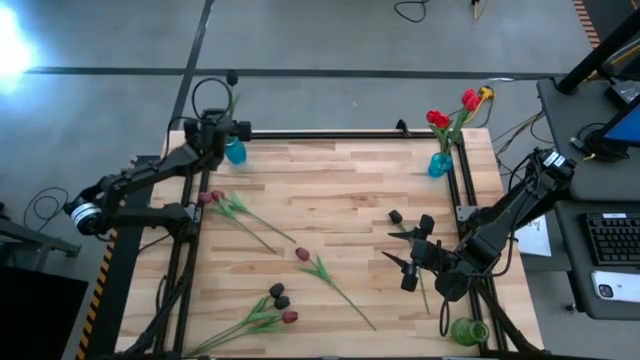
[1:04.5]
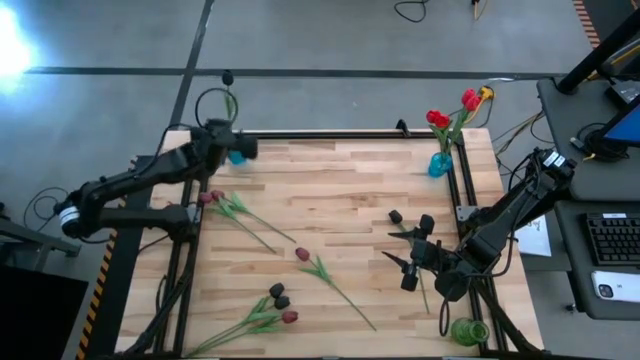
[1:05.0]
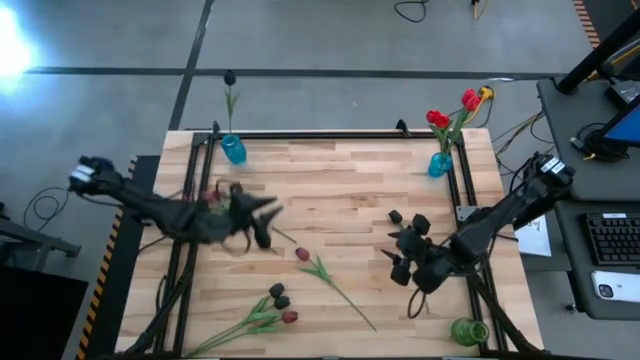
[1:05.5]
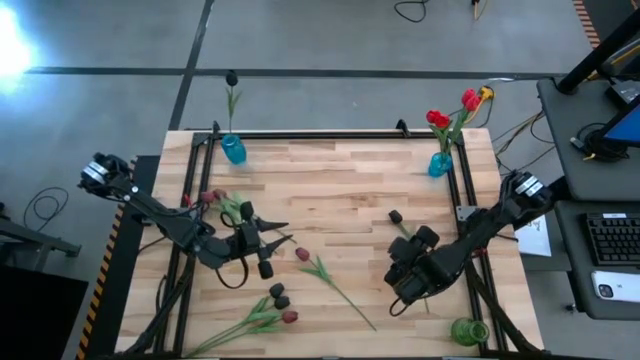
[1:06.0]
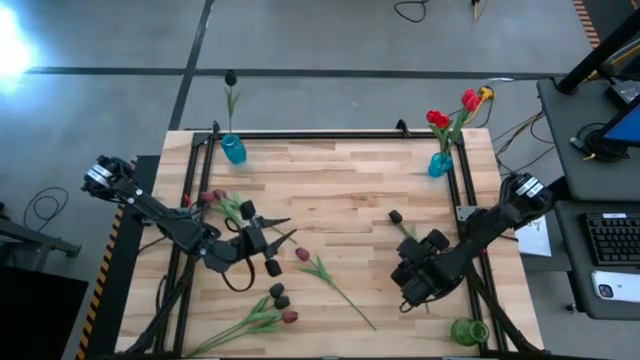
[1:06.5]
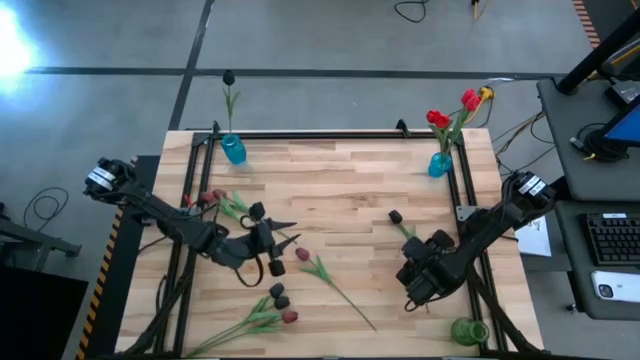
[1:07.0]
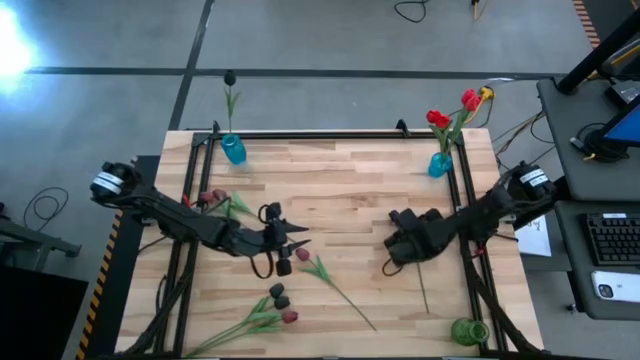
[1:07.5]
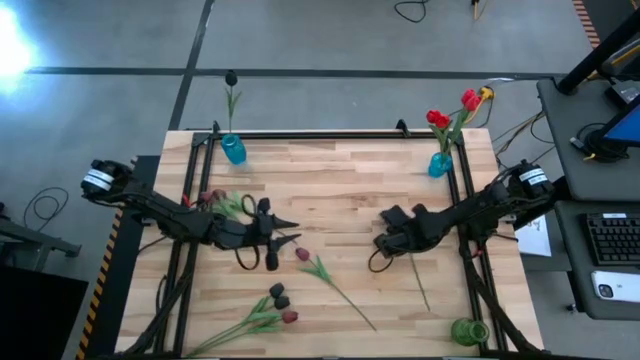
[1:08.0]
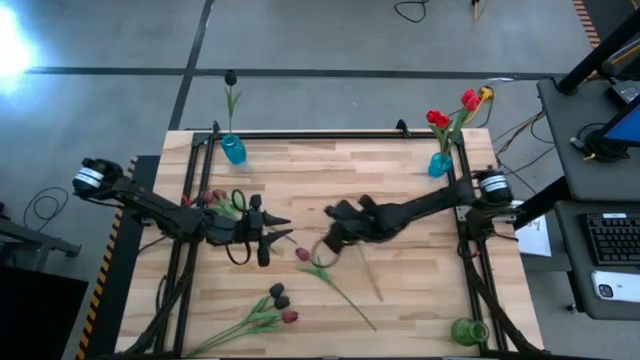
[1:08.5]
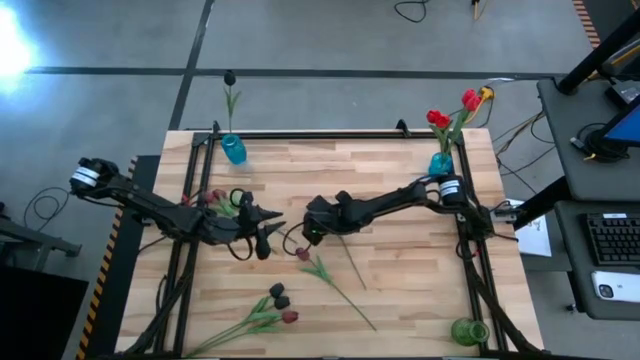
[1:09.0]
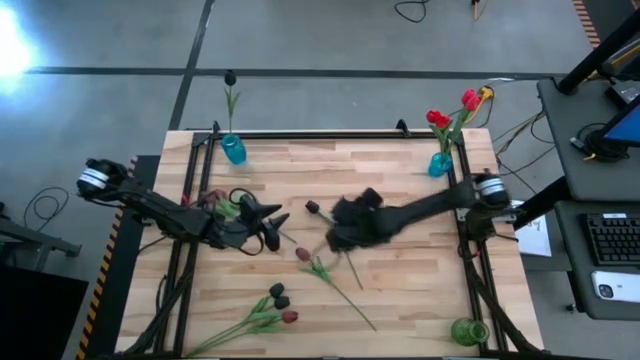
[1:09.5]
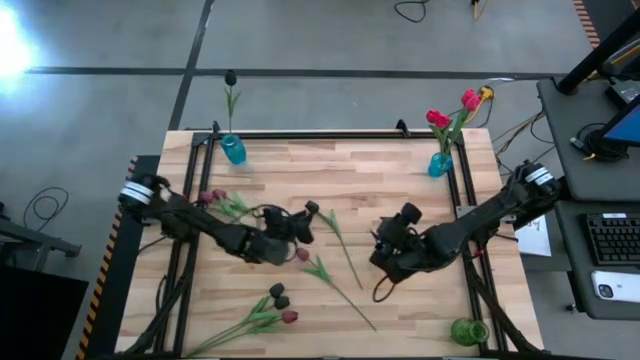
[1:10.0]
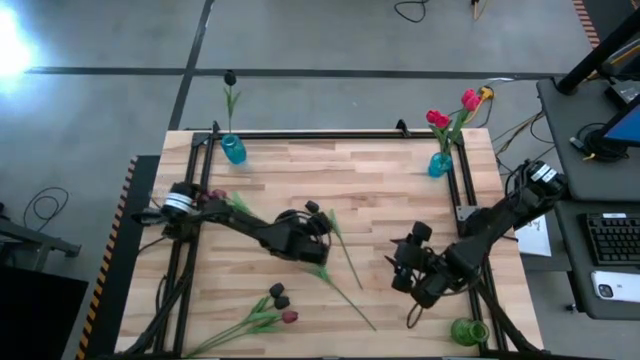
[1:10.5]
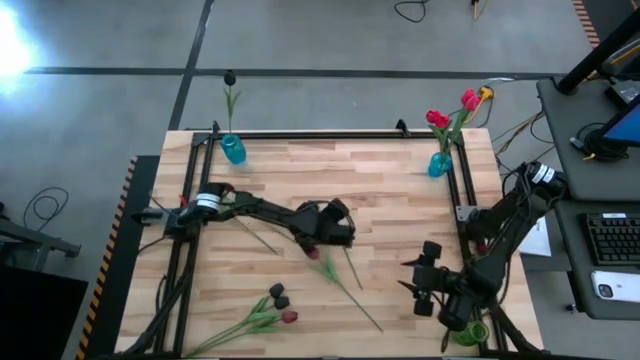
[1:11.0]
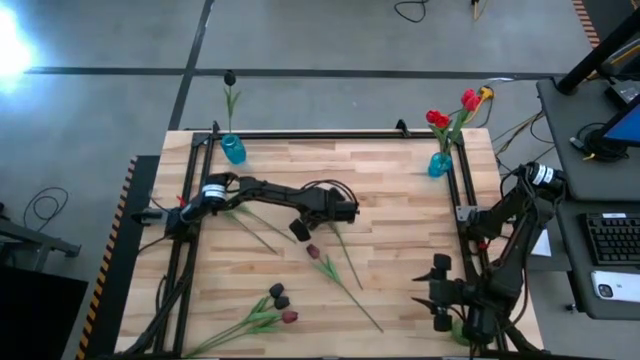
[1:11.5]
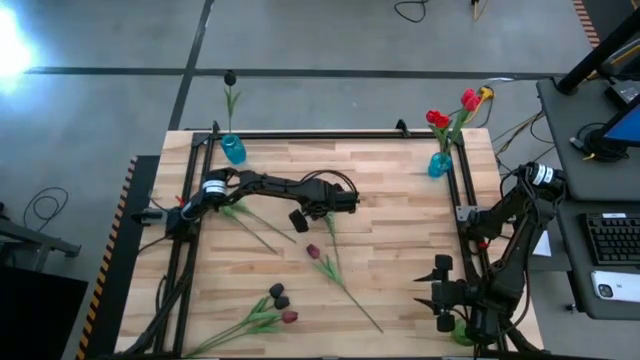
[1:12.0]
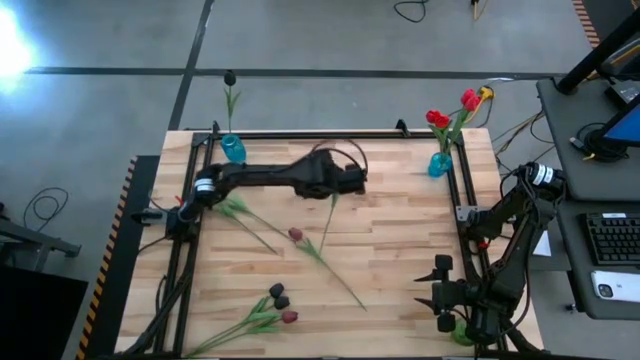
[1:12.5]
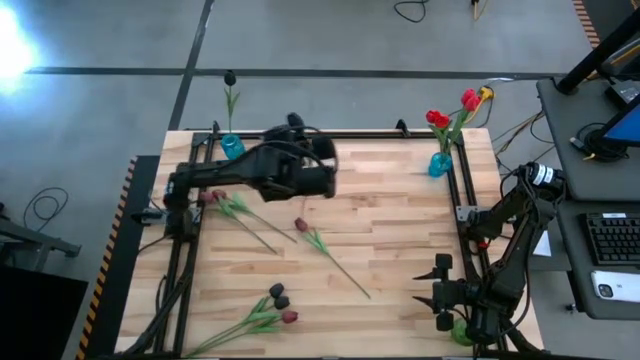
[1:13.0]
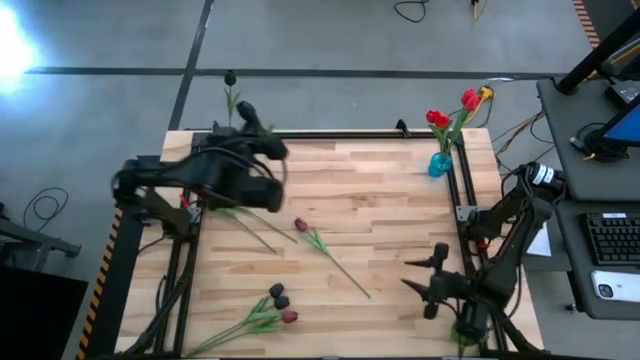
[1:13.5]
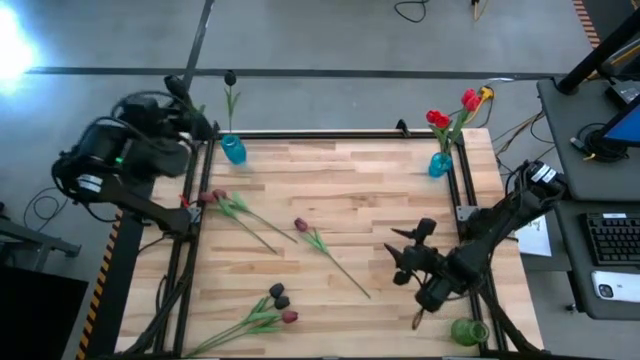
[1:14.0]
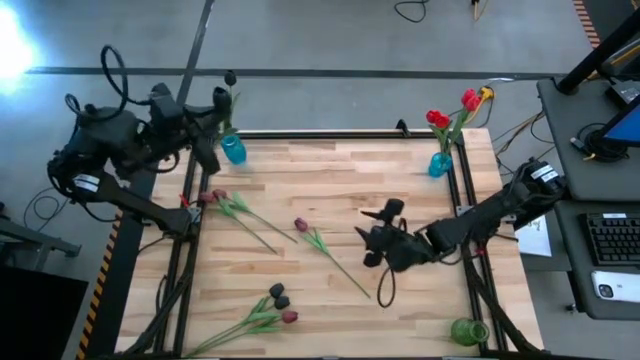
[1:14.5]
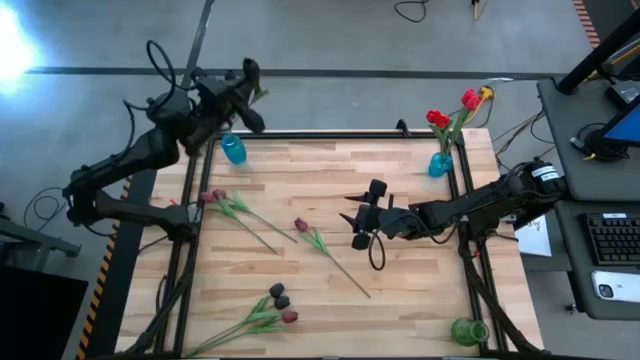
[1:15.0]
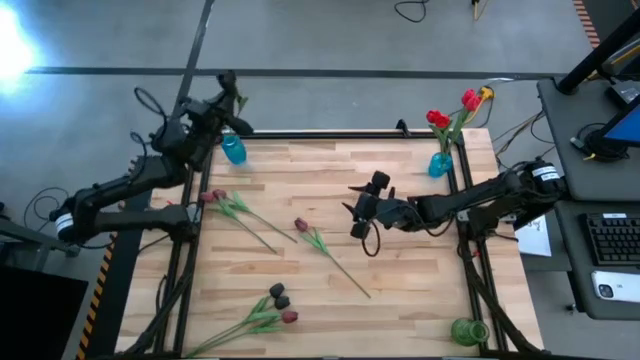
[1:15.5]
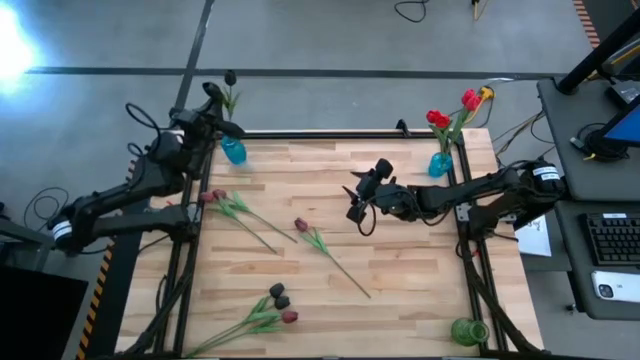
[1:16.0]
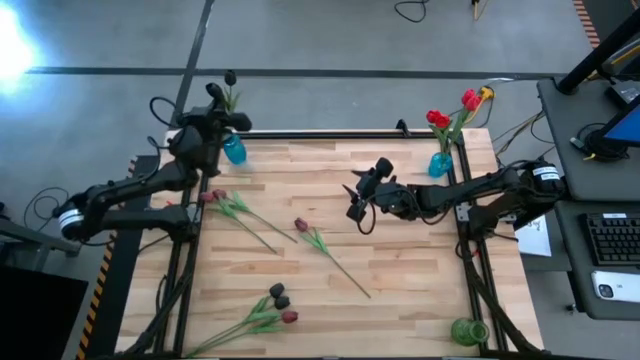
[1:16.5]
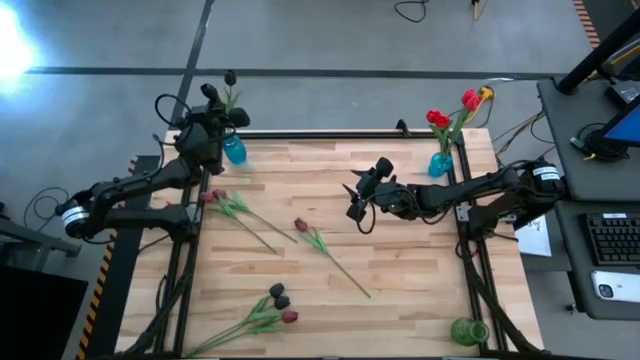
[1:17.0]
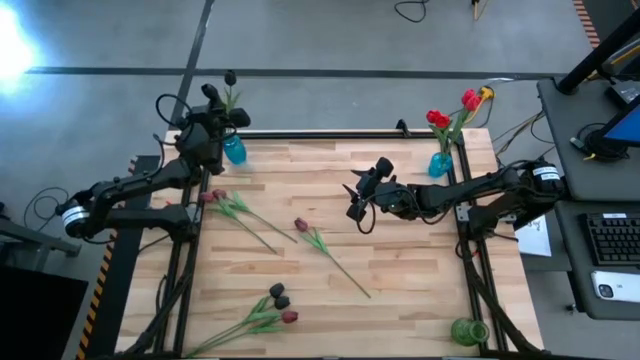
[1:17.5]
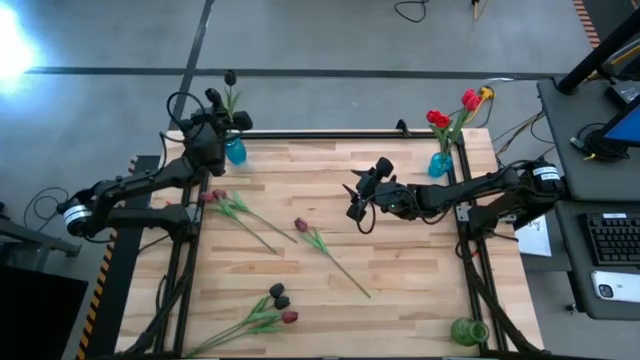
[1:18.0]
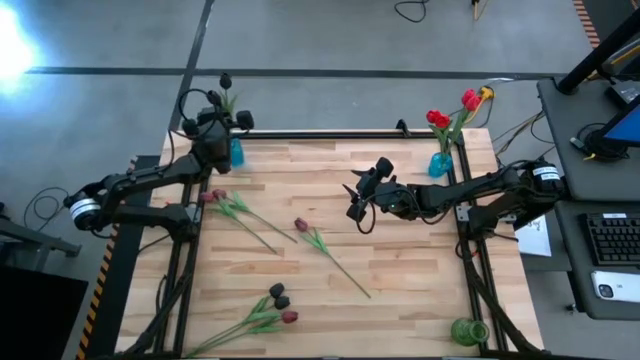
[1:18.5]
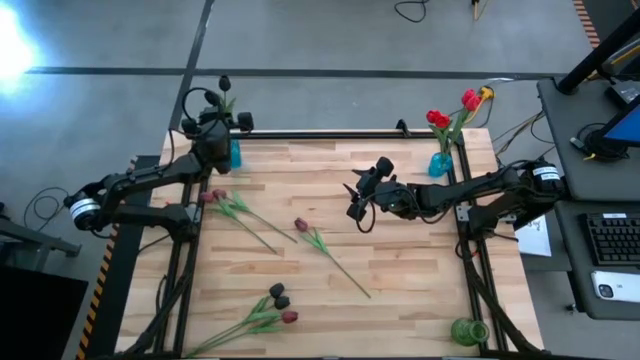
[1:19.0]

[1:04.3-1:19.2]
Task: Sort flowers into vase by color
Put the black tulip into the left blue vase

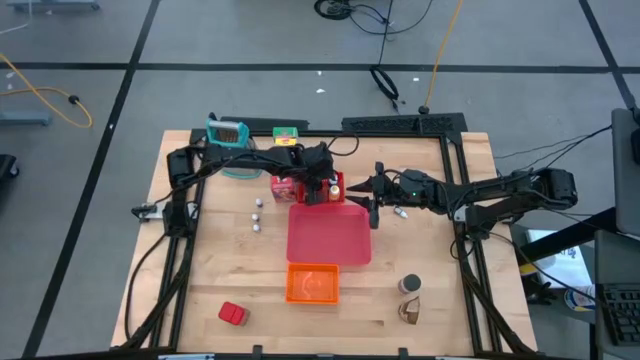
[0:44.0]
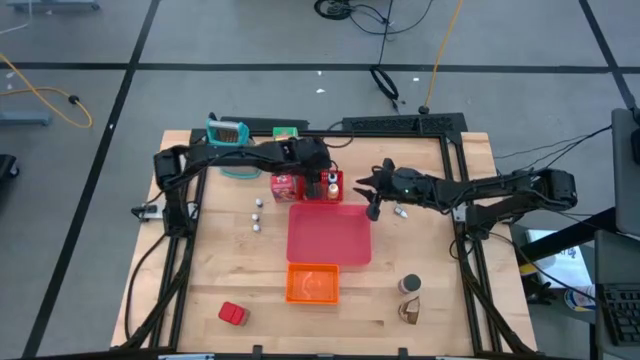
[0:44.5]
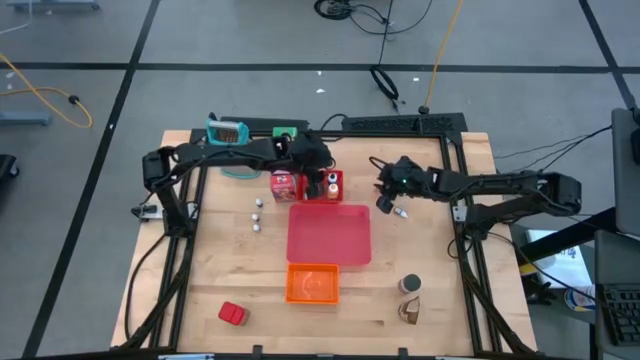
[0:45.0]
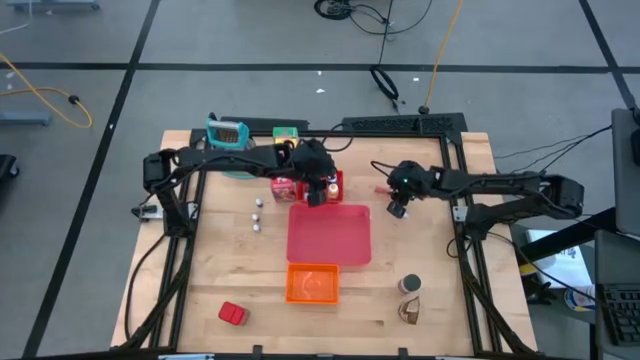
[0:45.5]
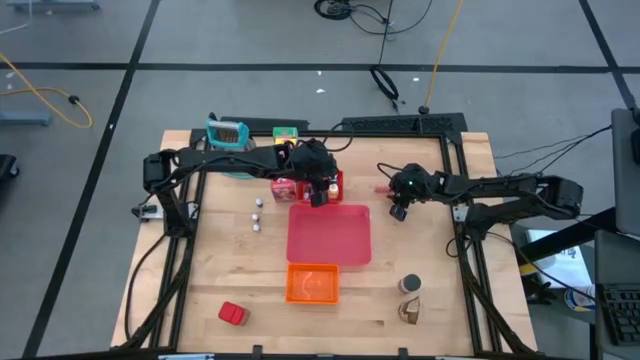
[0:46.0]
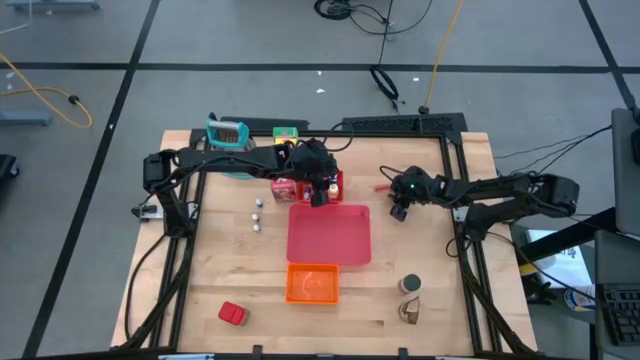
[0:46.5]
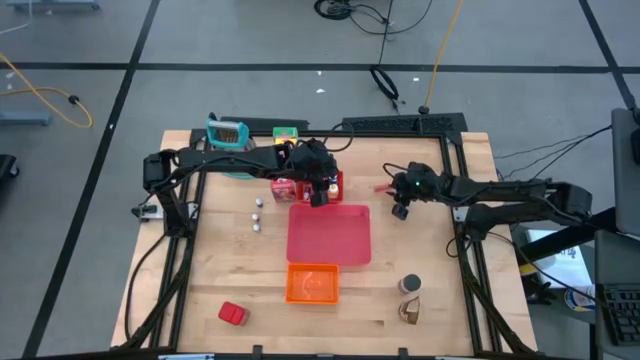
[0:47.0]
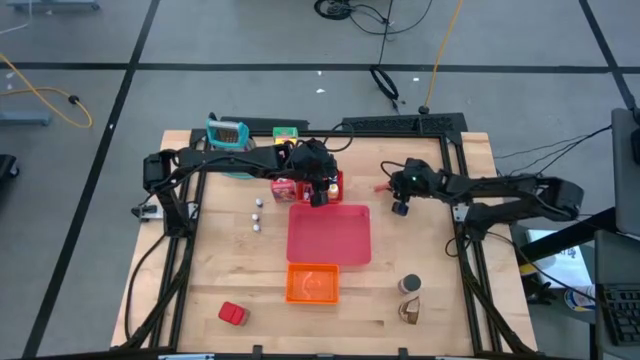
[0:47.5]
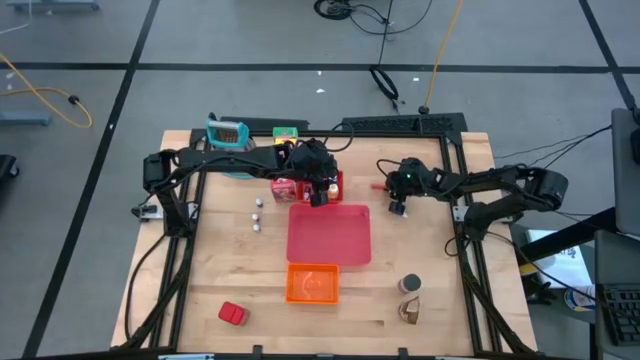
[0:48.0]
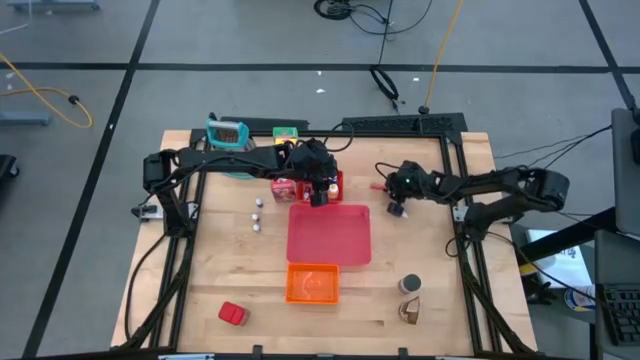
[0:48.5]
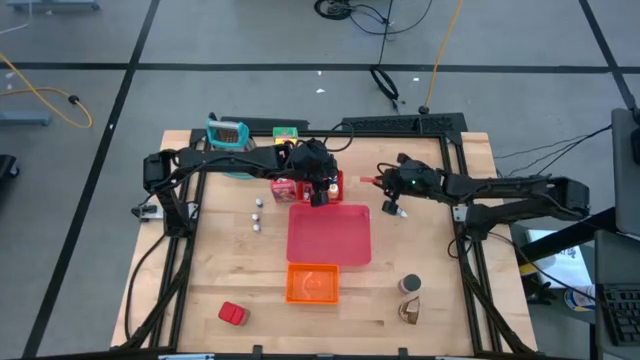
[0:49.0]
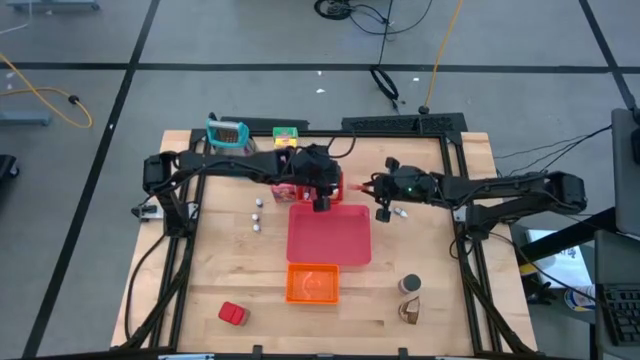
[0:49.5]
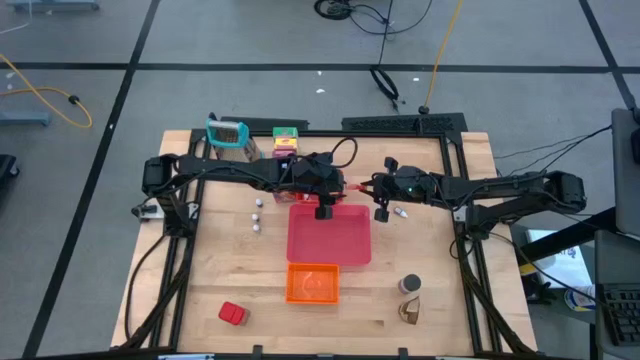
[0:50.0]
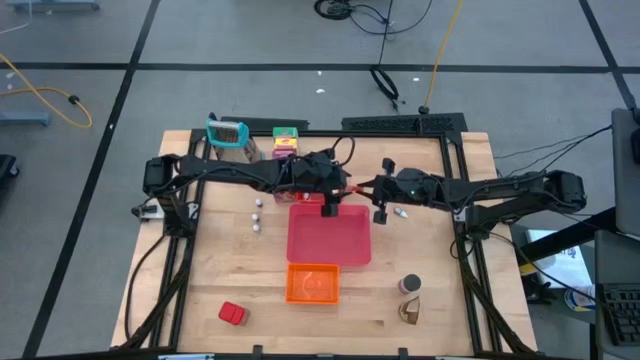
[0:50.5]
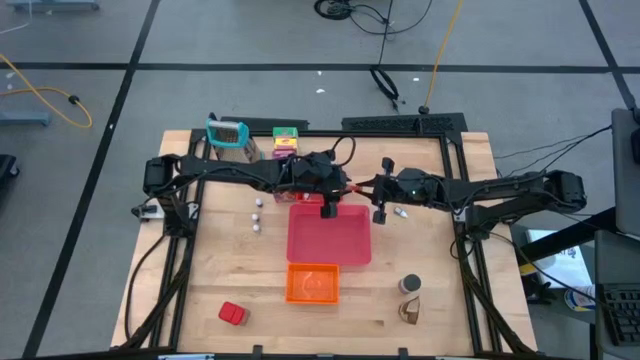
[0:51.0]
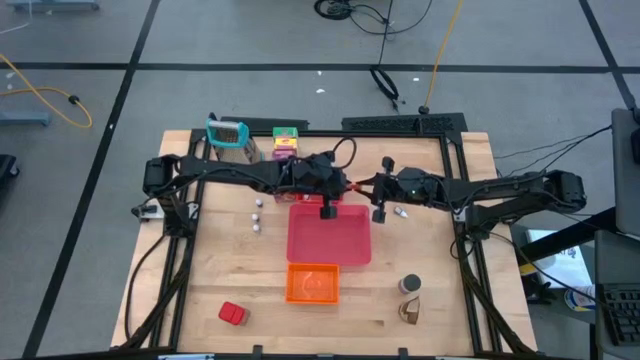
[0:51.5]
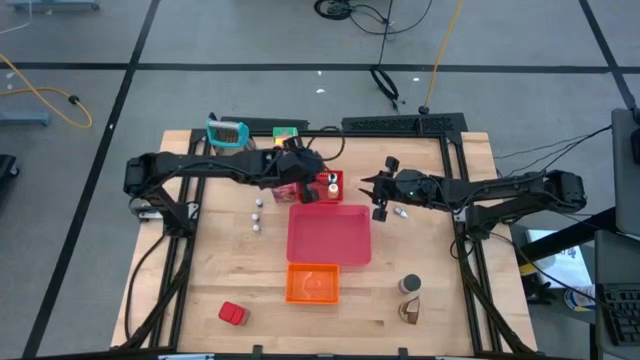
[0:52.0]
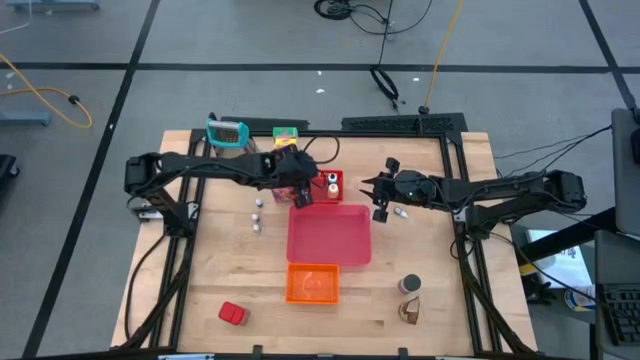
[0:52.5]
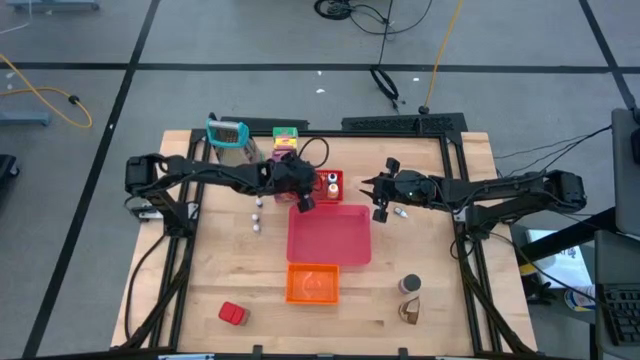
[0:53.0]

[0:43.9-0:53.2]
Task: Pick & Place Kitchen Items
Put the transparent food coloring bottle into the red bin
